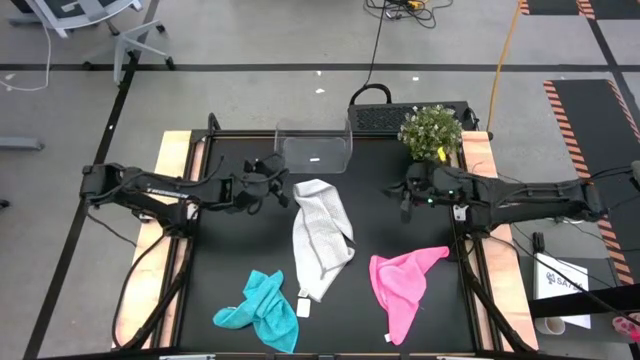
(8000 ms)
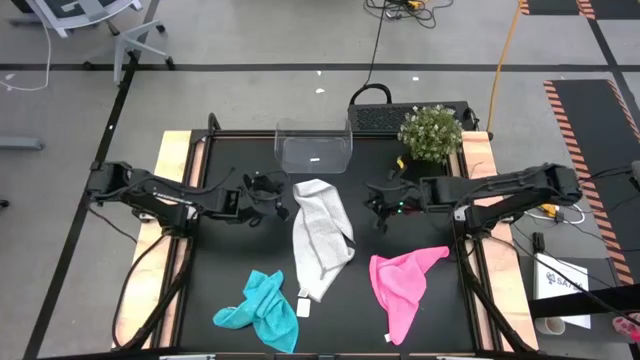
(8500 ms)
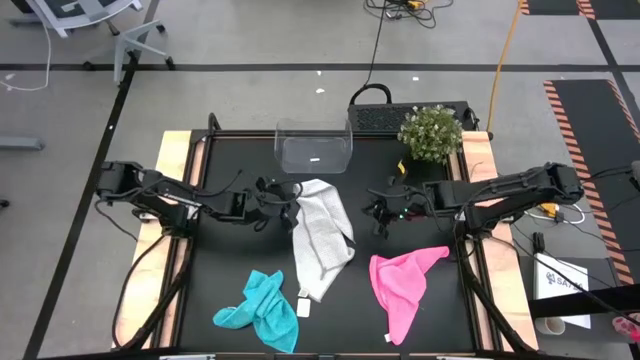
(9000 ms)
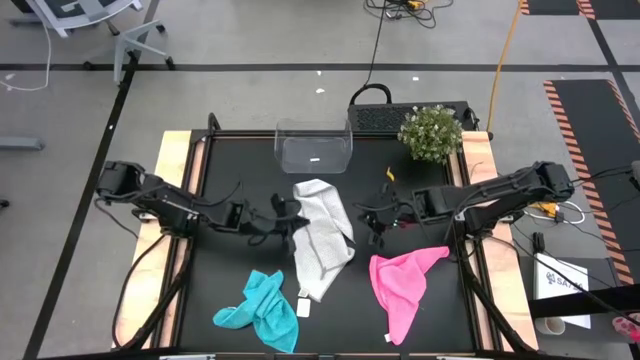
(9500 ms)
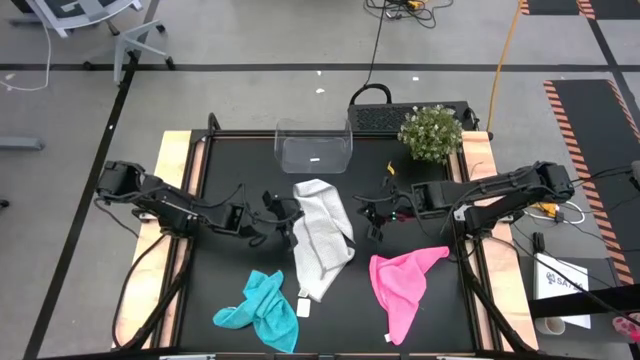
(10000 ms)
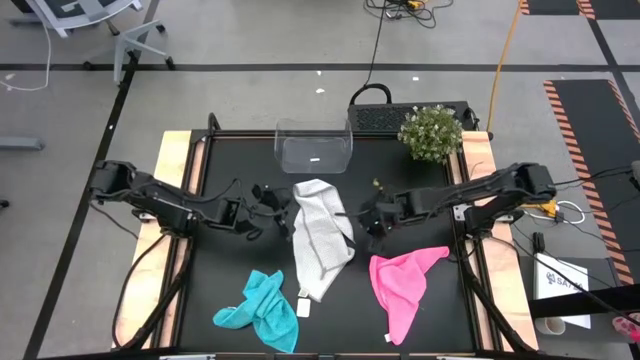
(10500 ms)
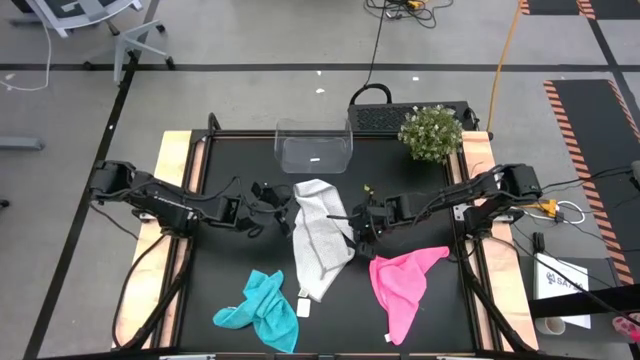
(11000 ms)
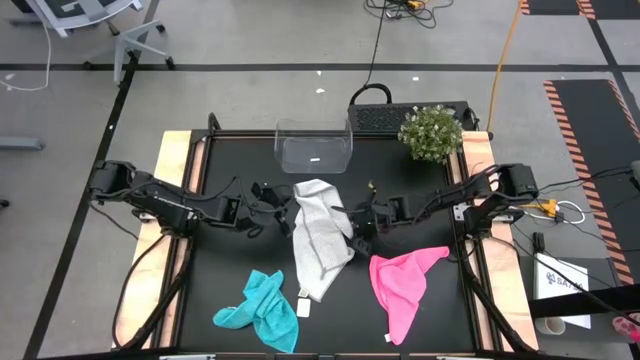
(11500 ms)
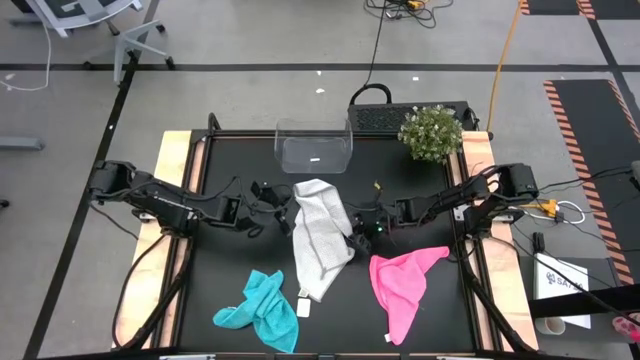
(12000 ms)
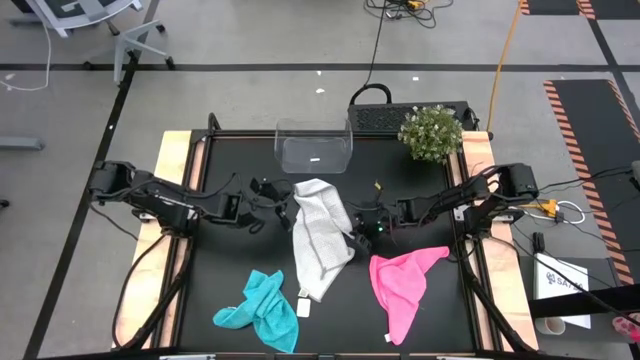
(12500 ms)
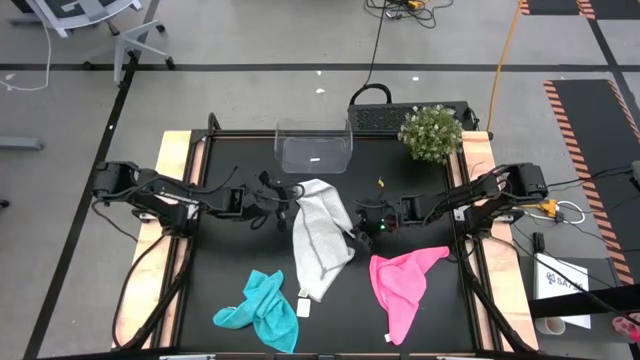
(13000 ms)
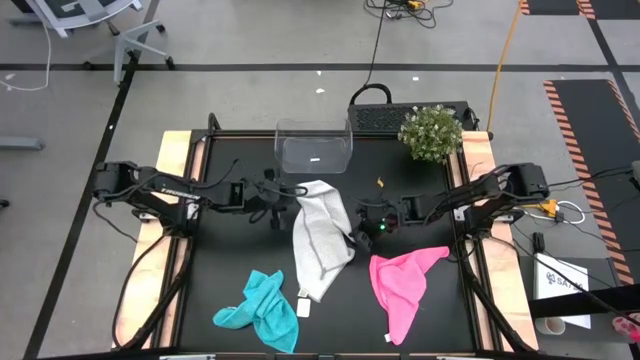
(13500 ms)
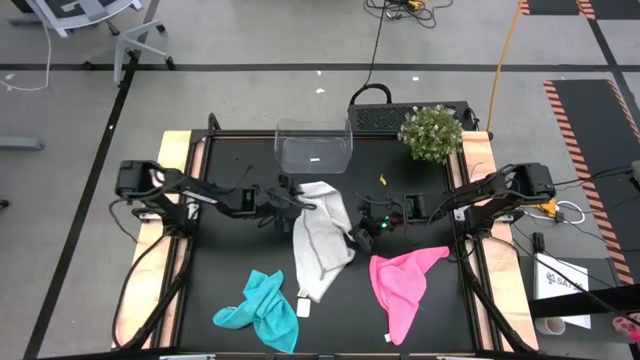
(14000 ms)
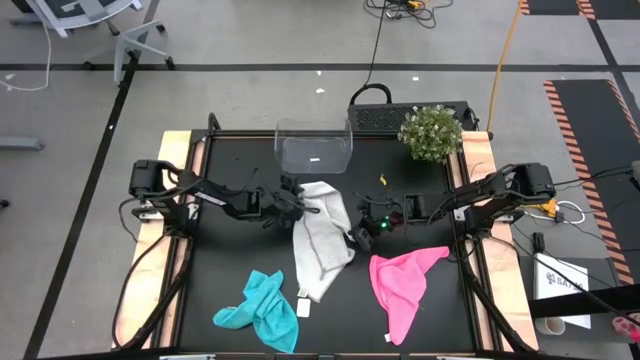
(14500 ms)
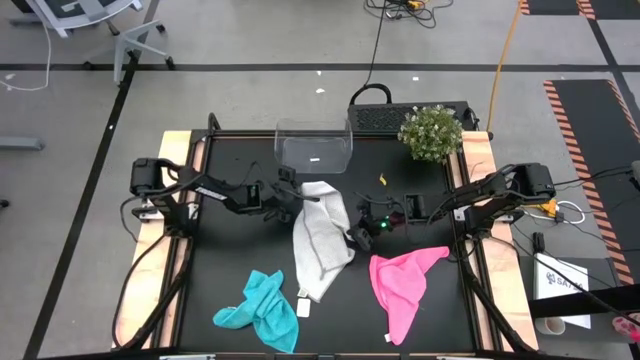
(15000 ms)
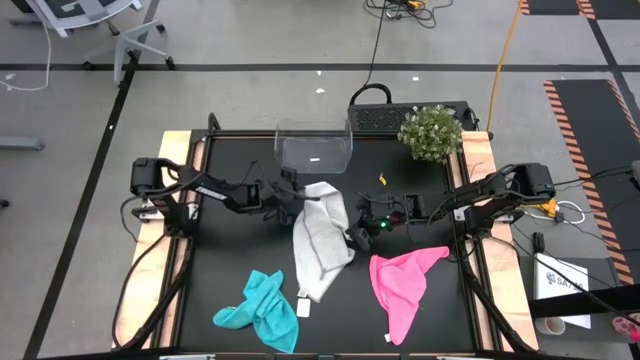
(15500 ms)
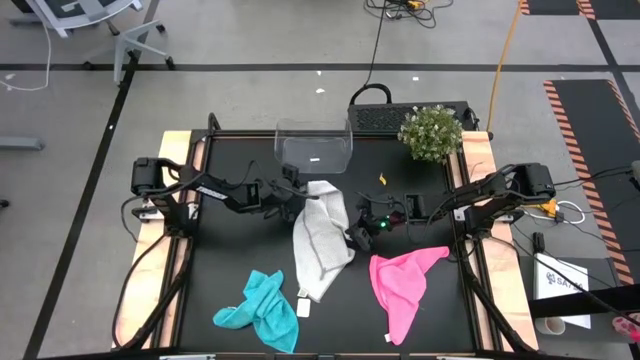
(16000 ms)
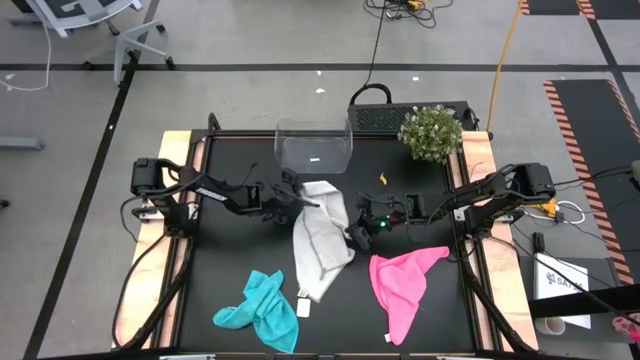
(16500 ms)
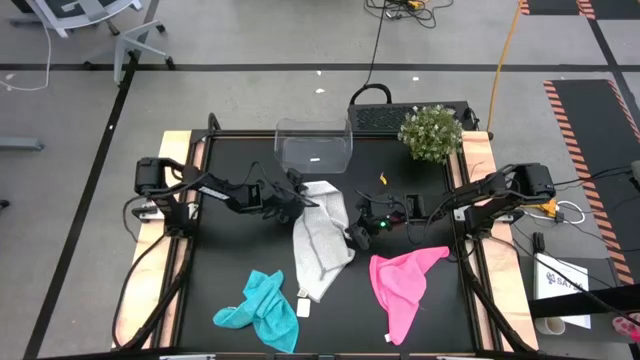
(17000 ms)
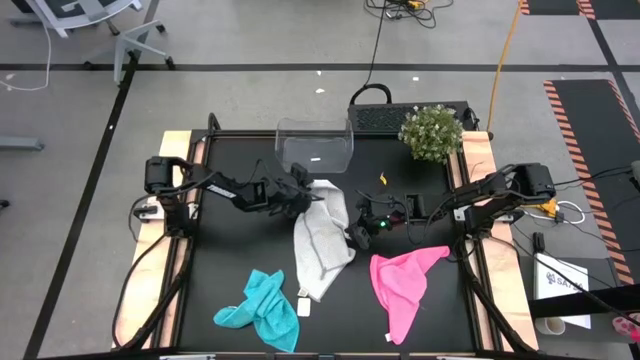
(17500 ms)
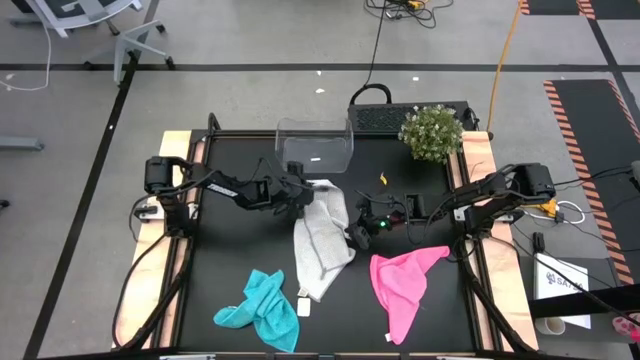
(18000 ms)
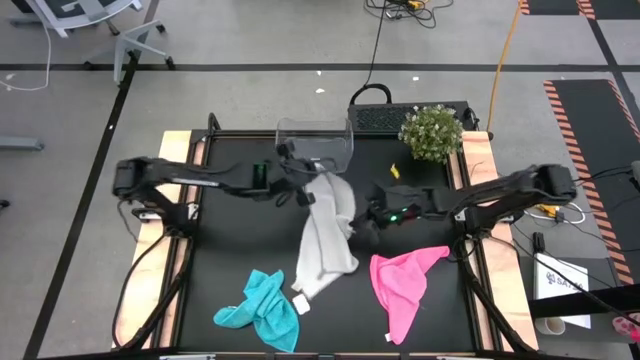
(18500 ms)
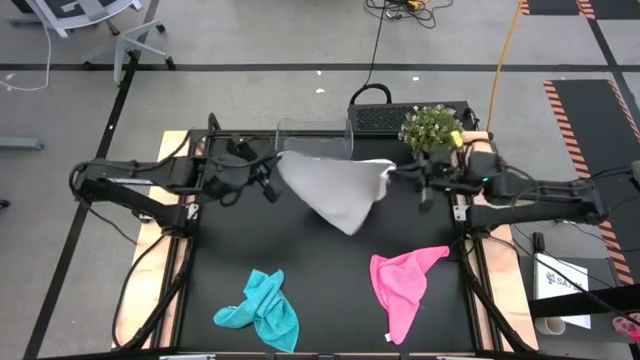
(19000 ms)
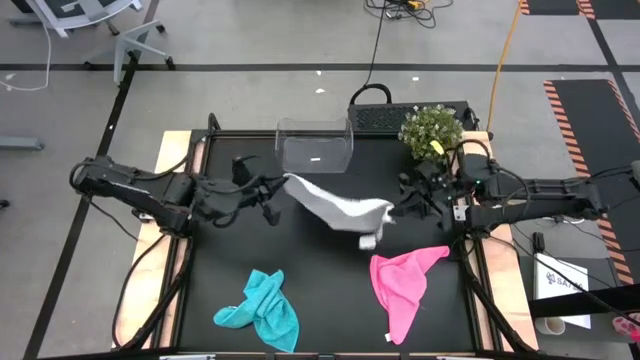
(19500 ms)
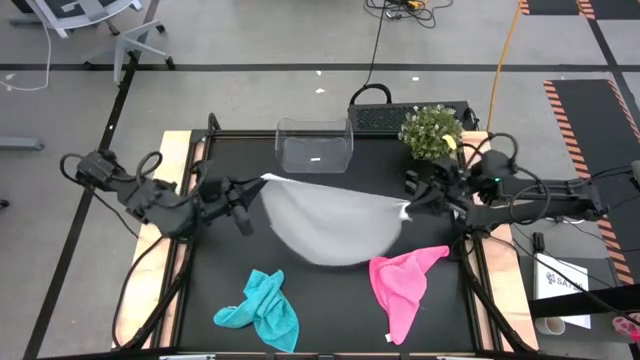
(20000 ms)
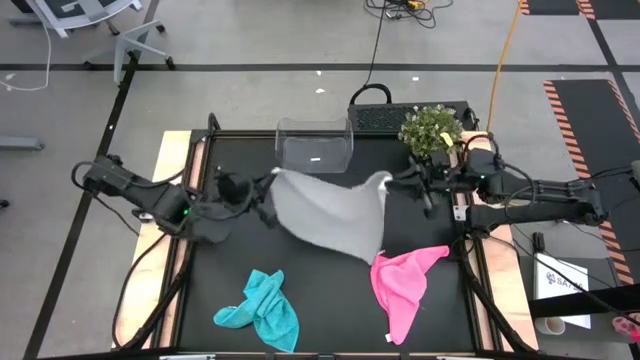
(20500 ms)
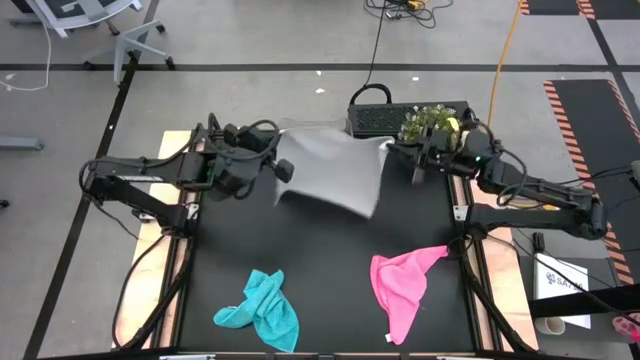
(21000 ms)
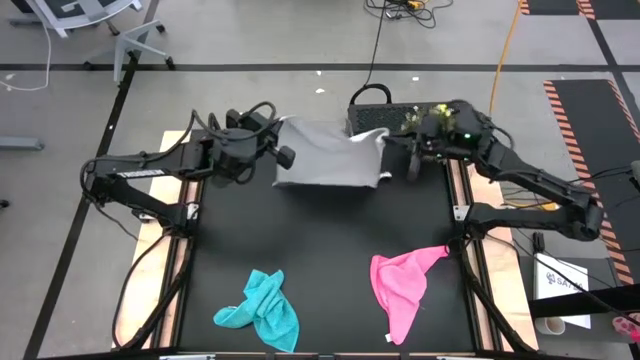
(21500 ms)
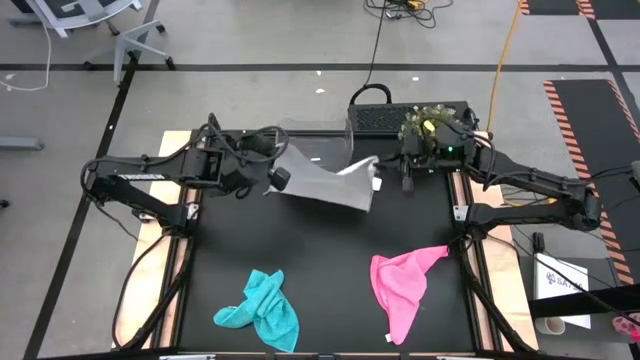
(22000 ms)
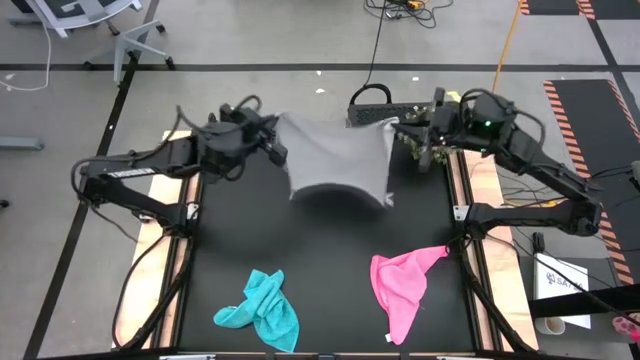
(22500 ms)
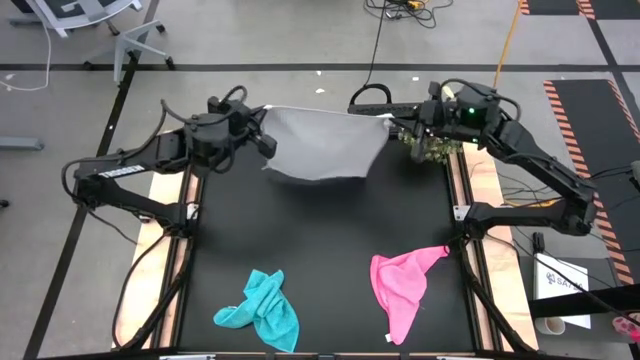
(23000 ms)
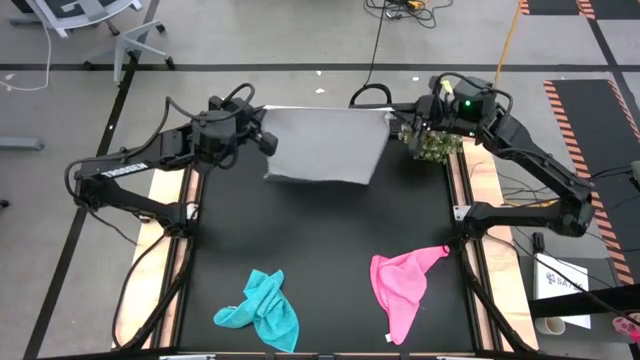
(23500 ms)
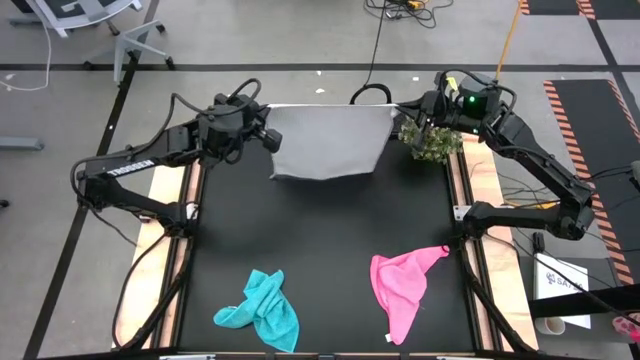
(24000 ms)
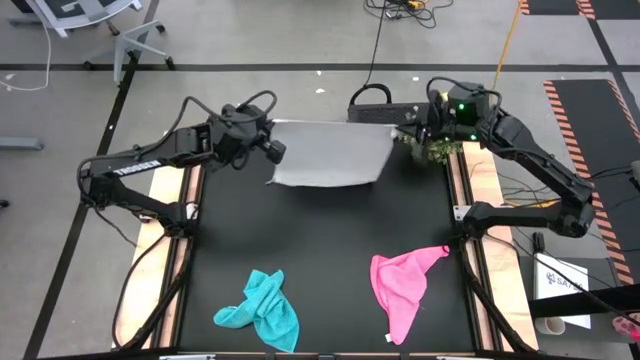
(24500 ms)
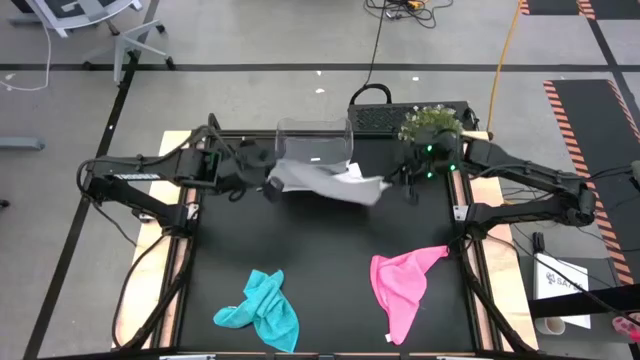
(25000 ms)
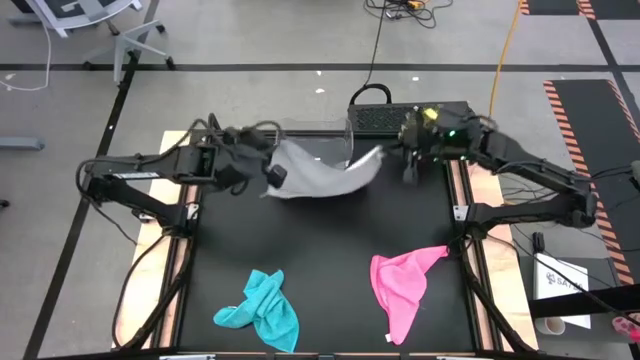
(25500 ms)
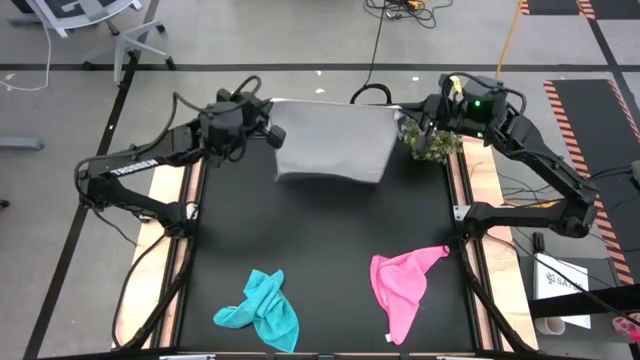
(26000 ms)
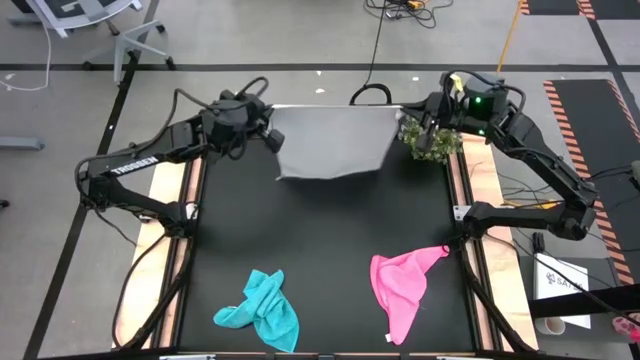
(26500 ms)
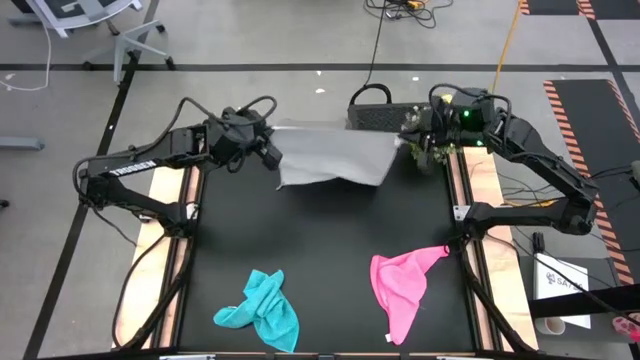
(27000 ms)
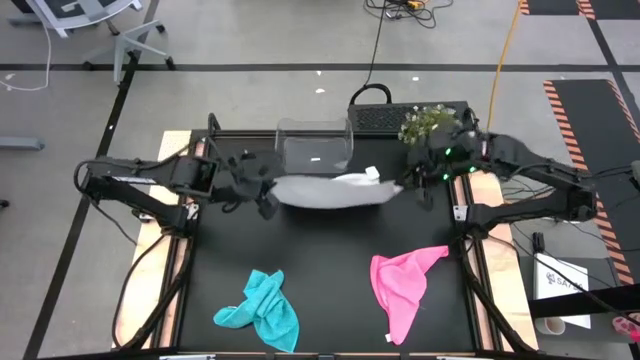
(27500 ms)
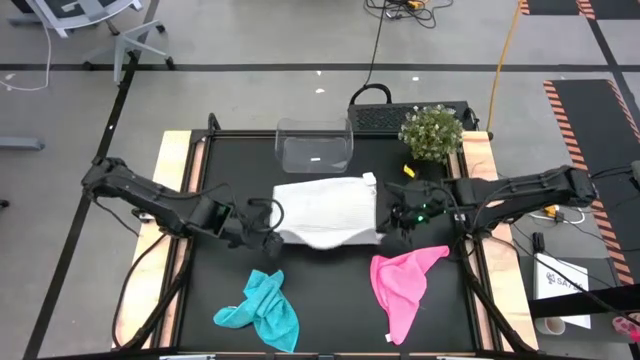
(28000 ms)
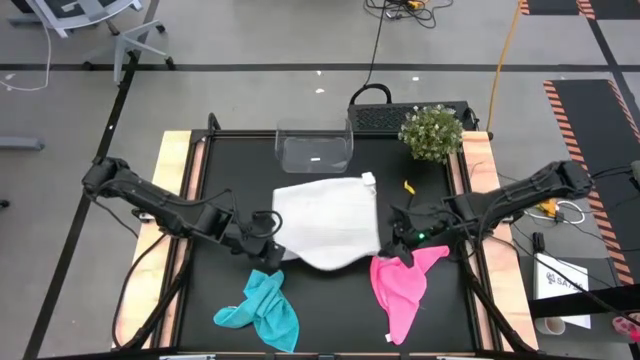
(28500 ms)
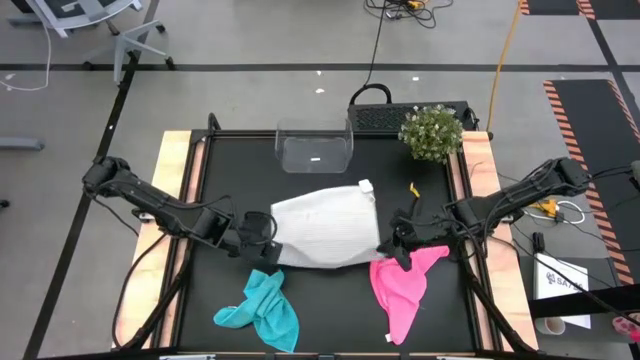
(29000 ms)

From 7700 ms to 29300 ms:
Task: Fold microfiber towels
Fold the gray microfiber cloth
